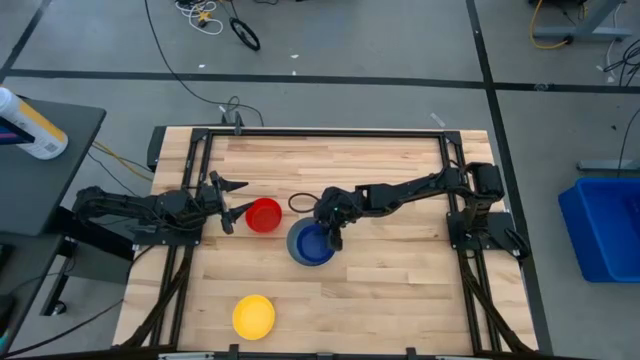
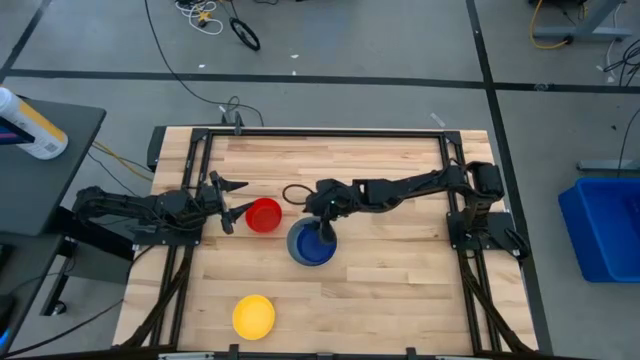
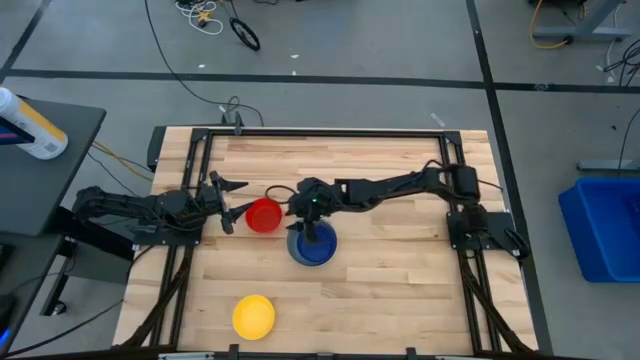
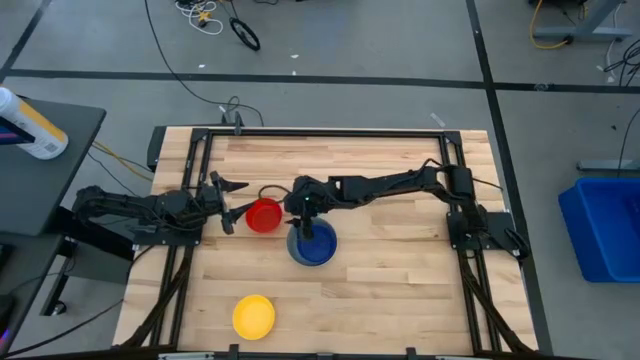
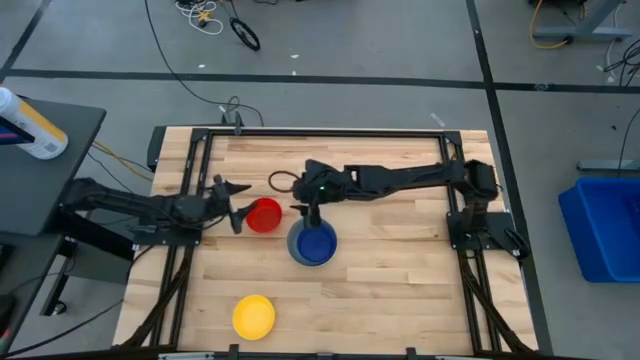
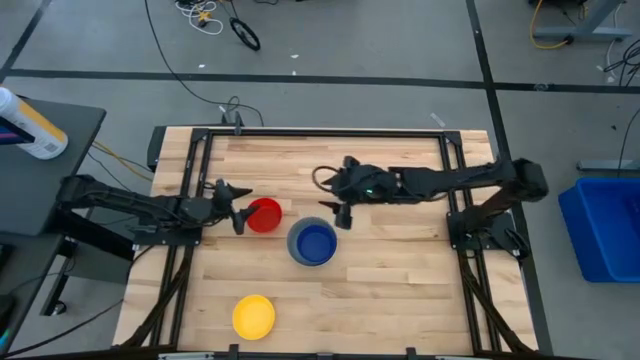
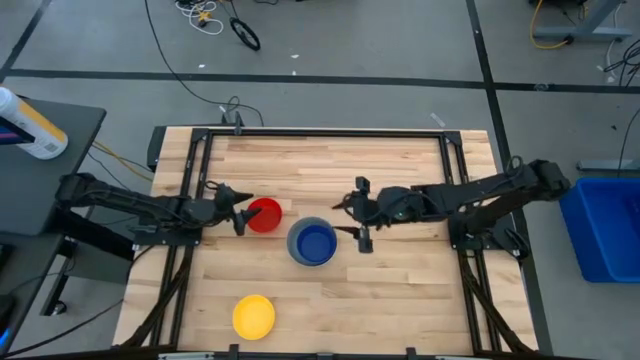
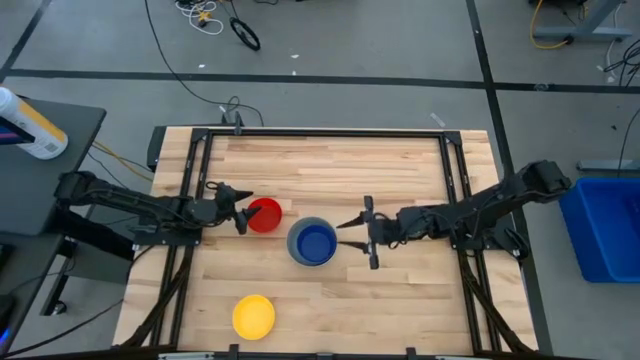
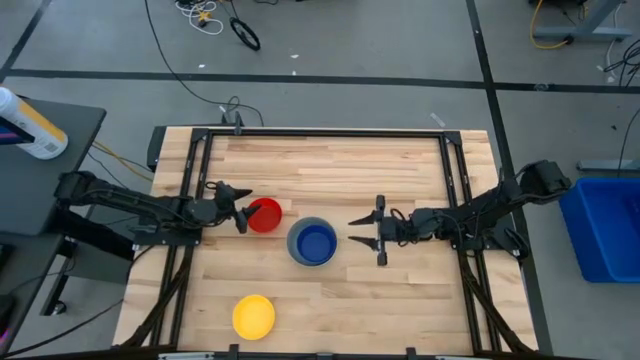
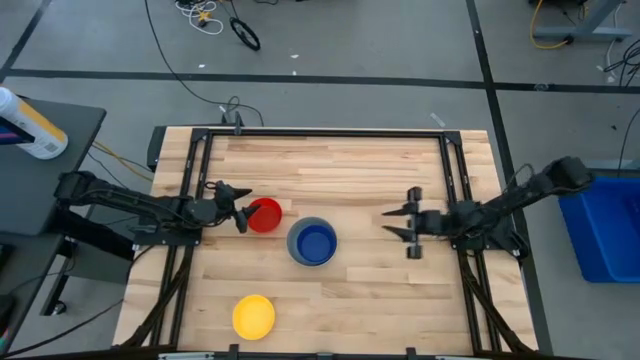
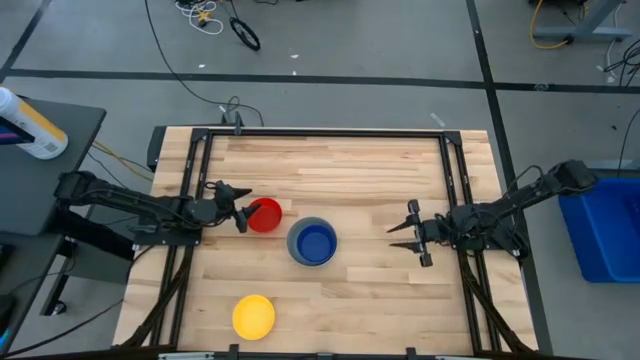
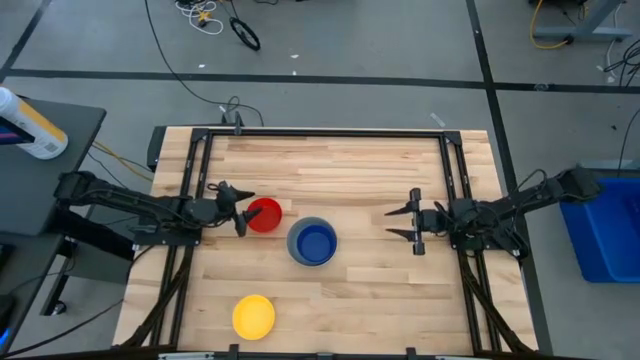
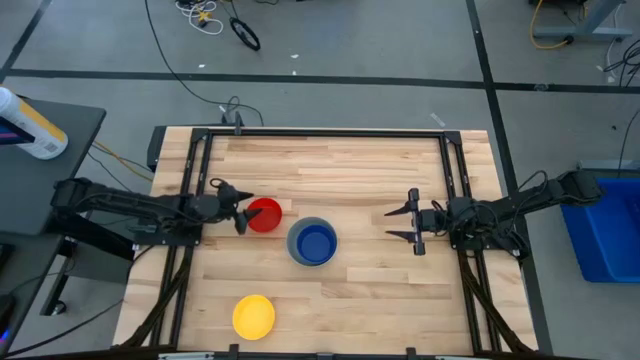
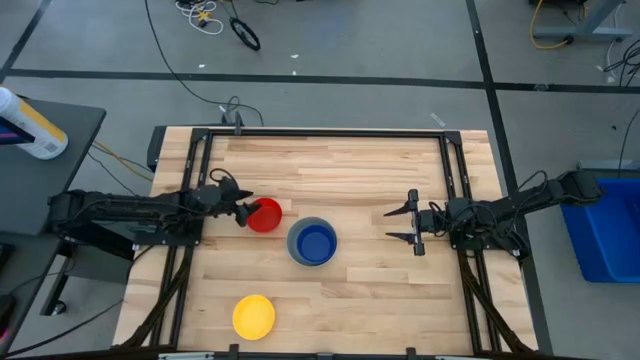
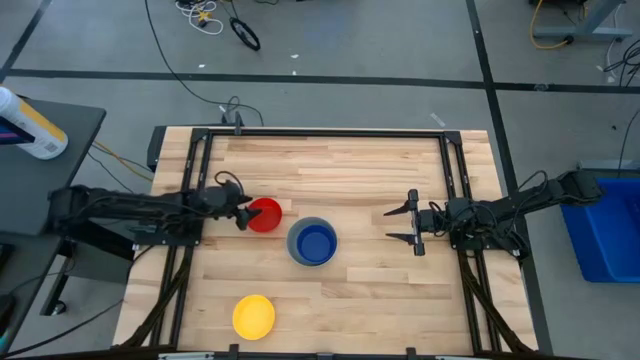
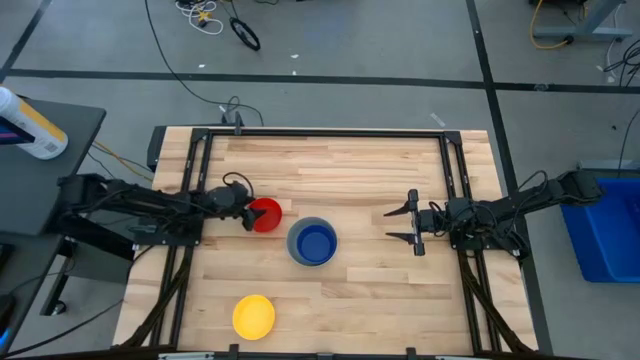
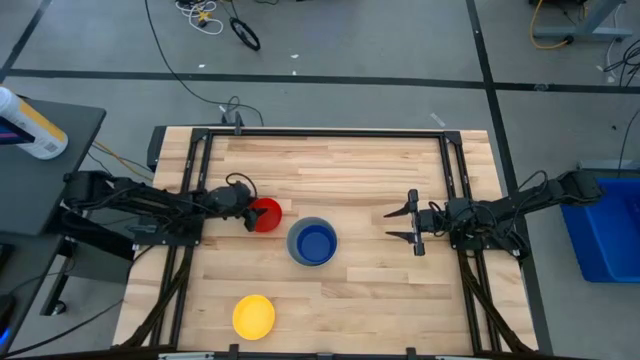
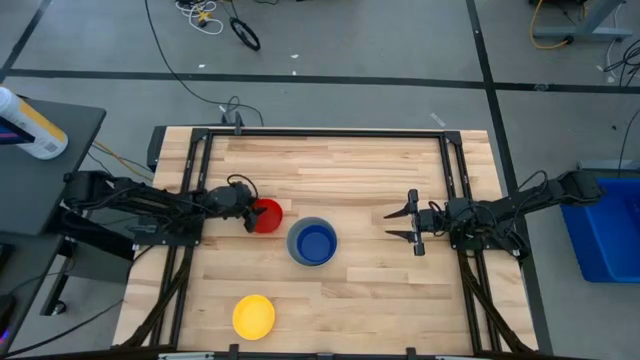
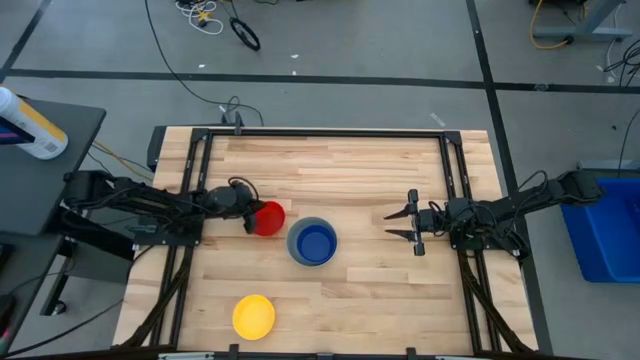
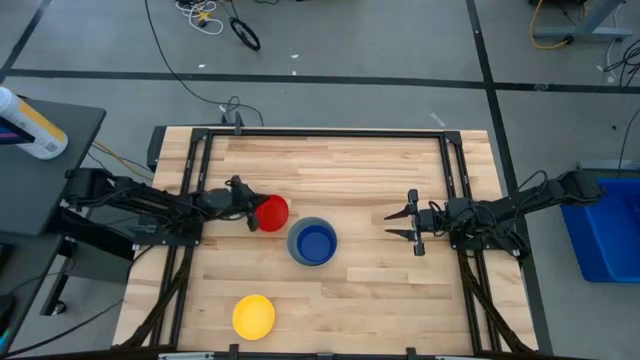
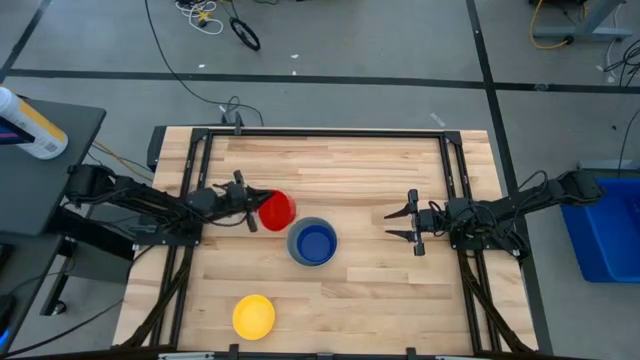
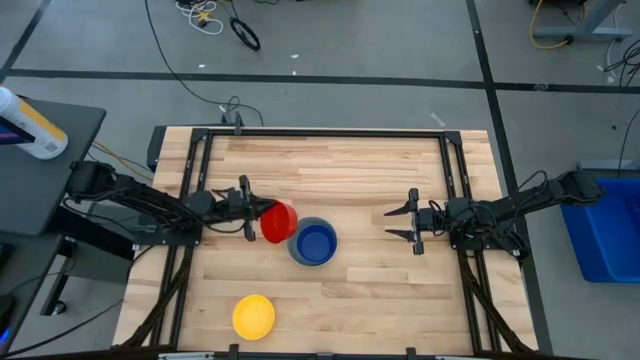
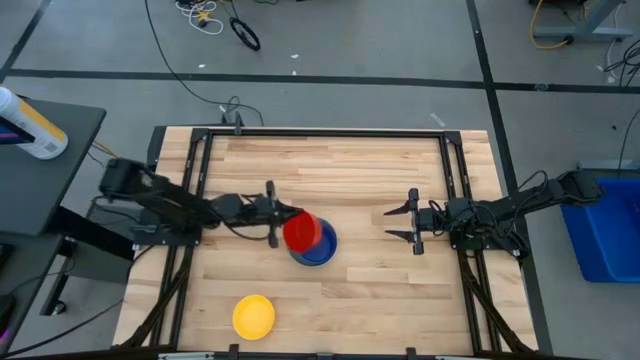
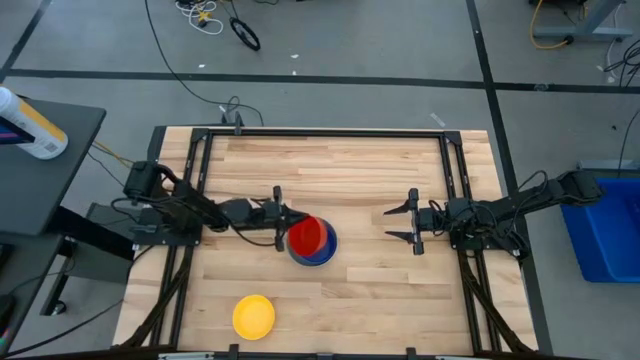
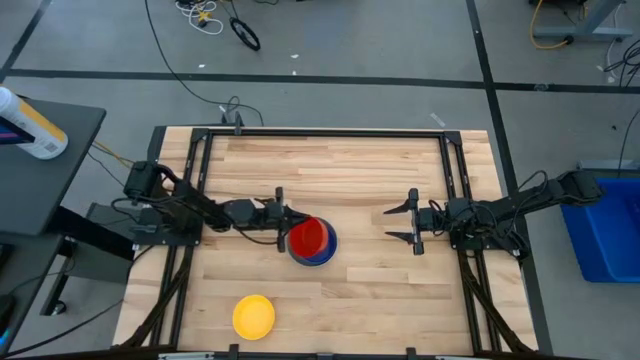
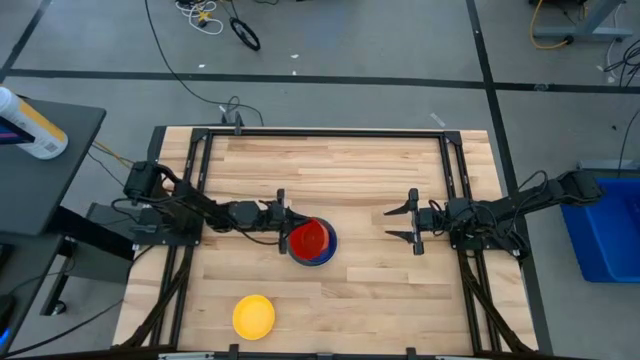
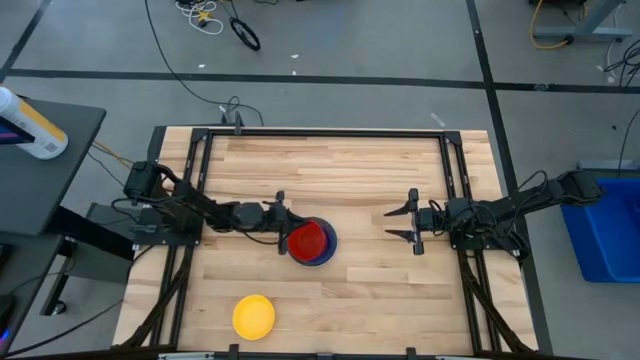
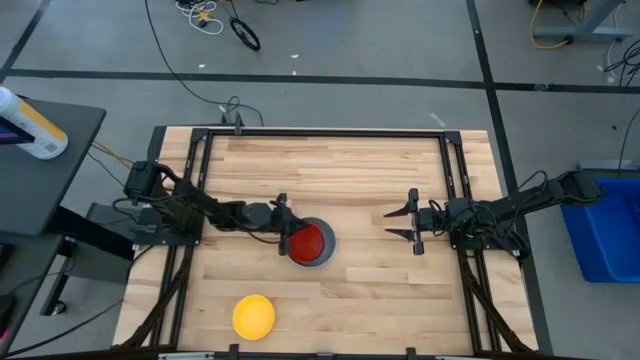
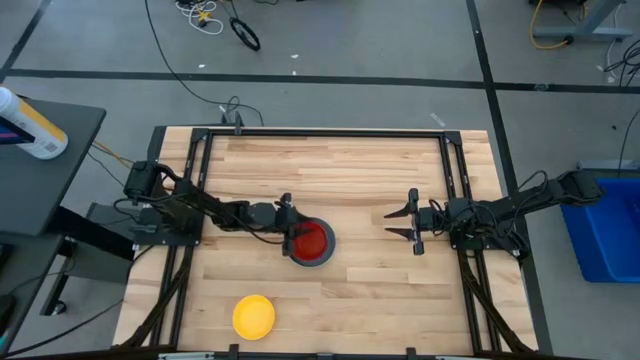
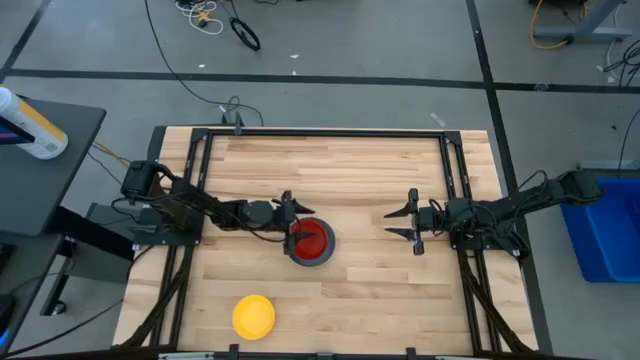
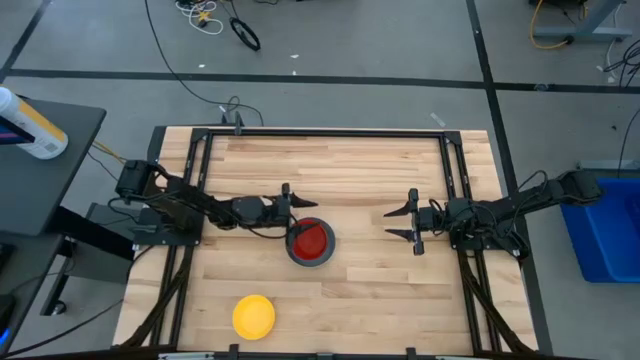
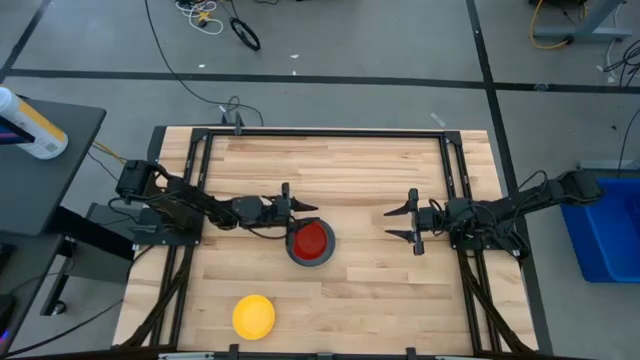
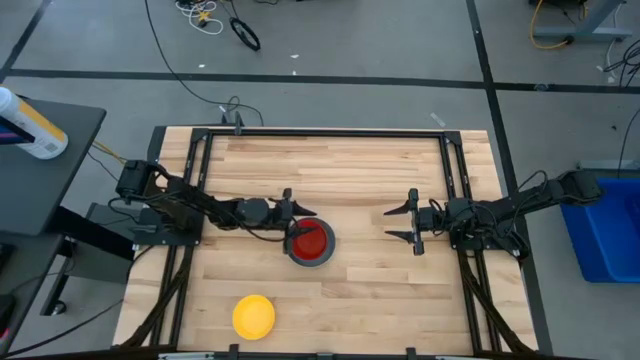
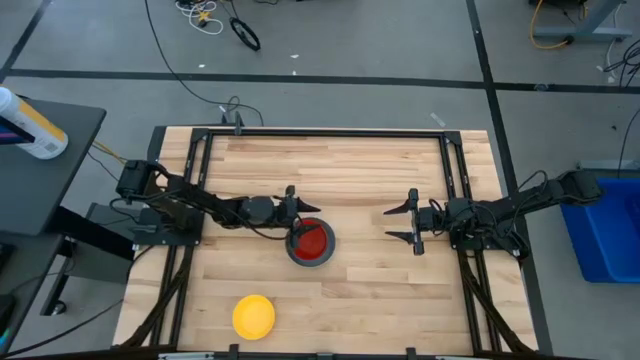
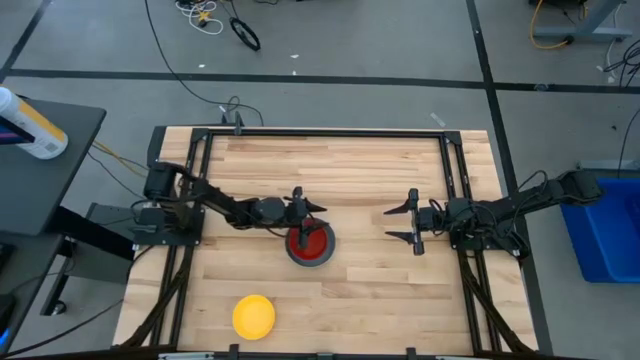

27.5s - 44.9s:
Stack the red bowl on the dark blue bowl
